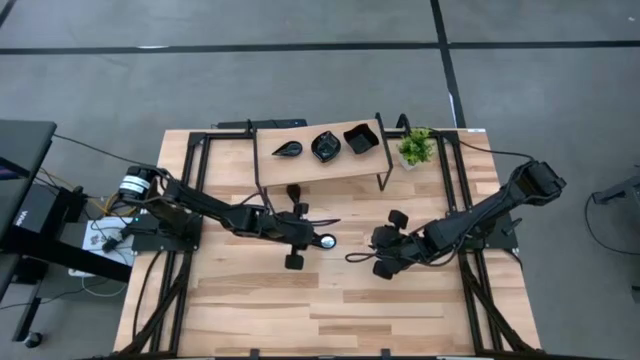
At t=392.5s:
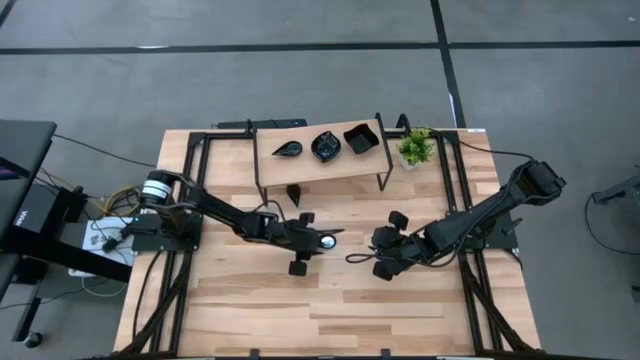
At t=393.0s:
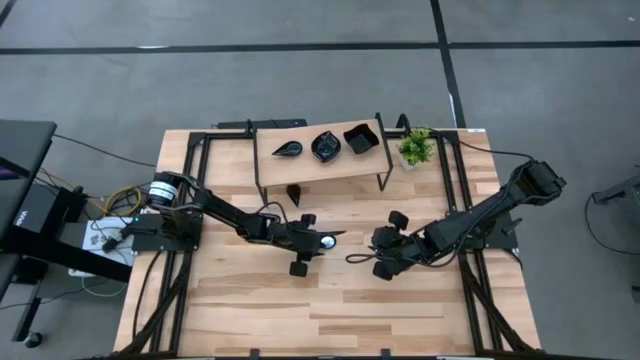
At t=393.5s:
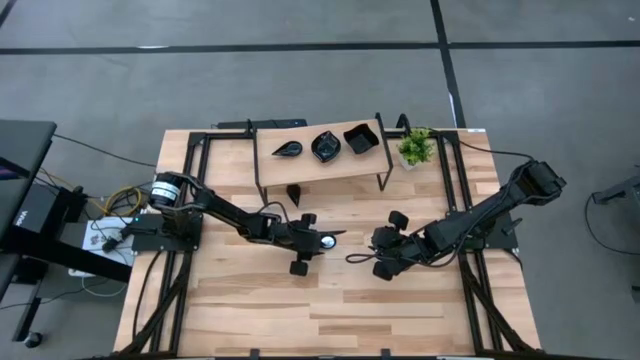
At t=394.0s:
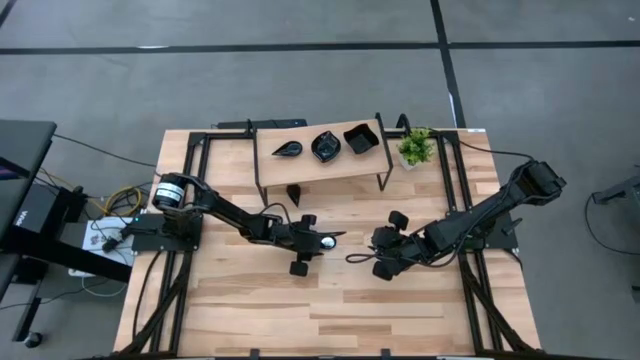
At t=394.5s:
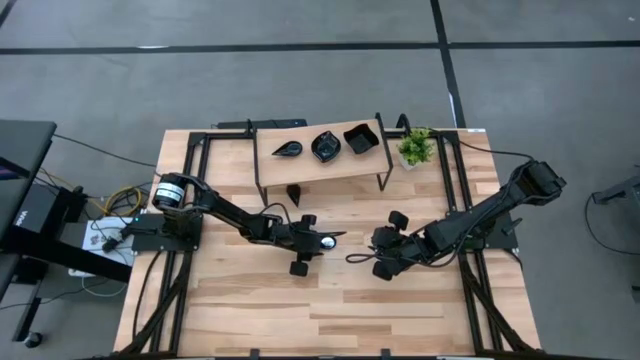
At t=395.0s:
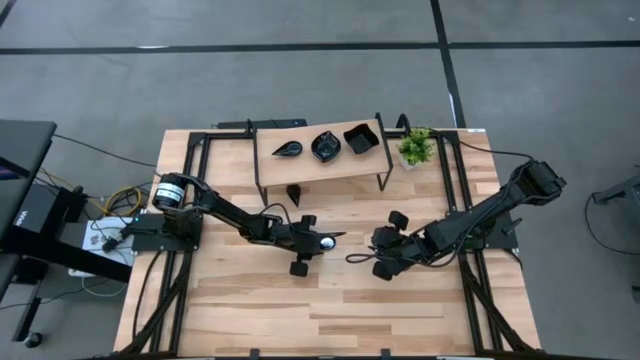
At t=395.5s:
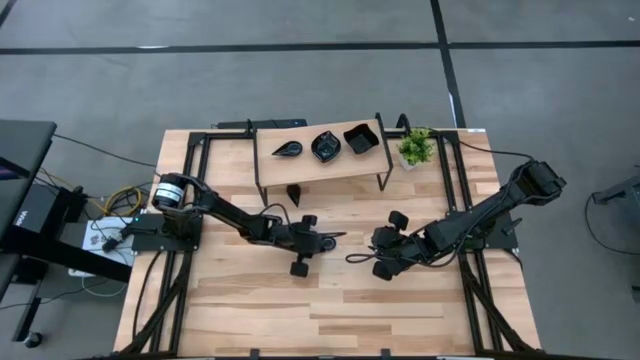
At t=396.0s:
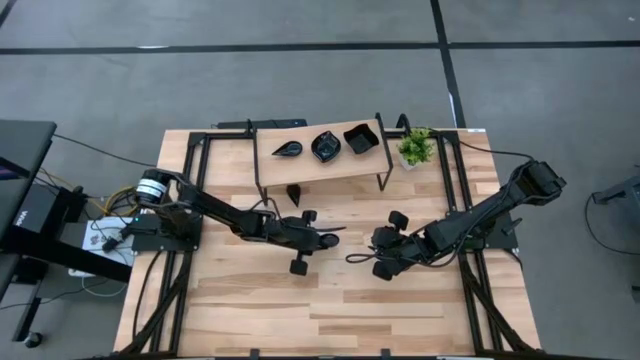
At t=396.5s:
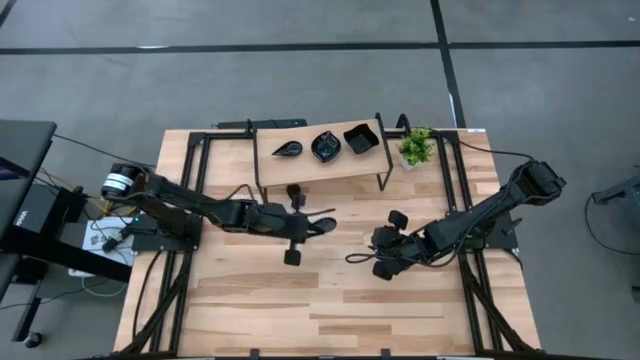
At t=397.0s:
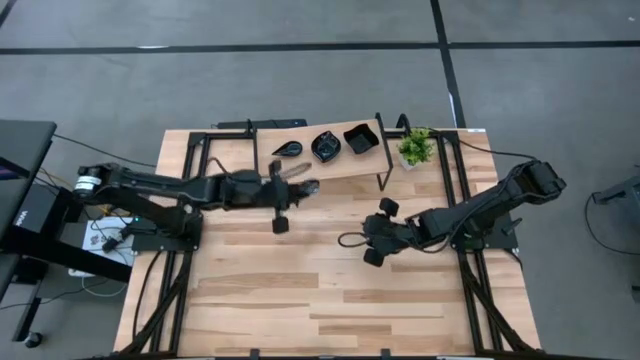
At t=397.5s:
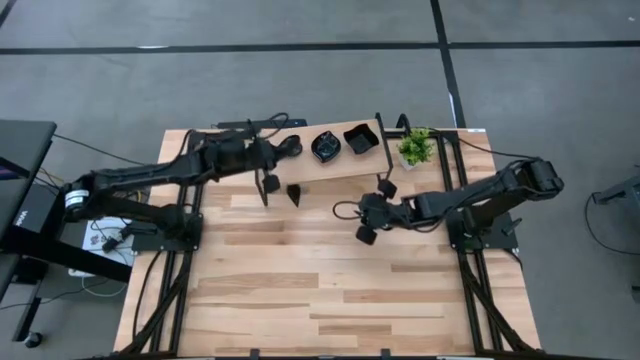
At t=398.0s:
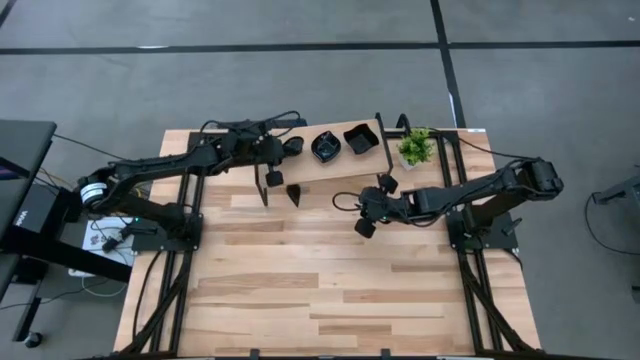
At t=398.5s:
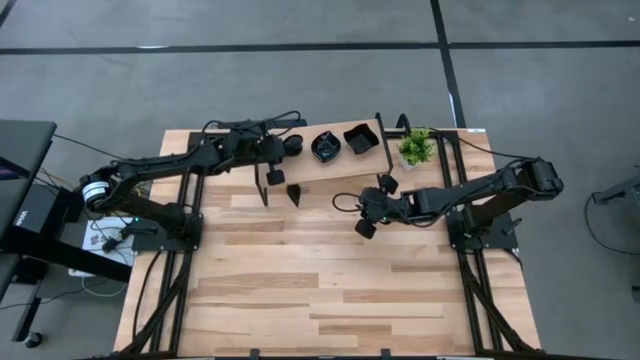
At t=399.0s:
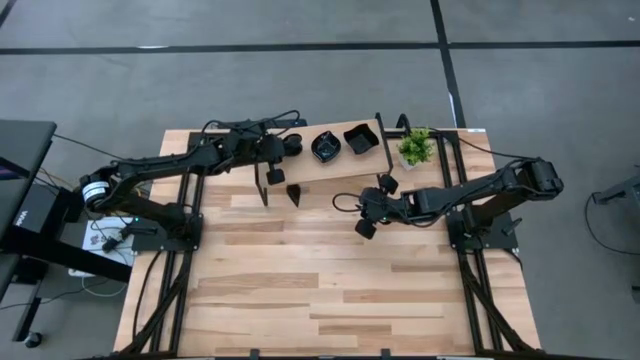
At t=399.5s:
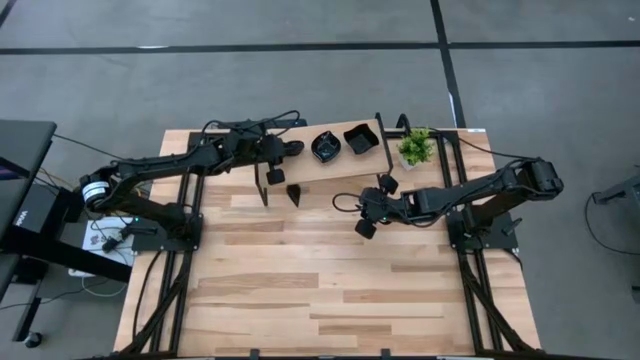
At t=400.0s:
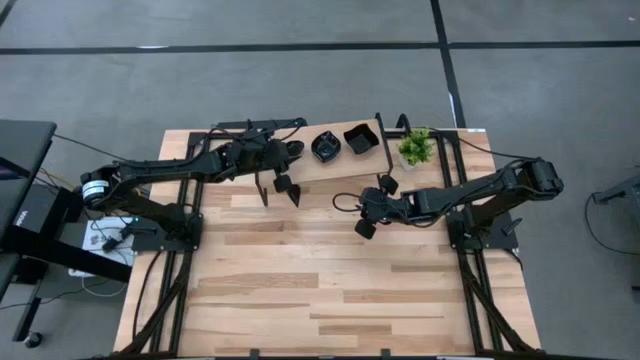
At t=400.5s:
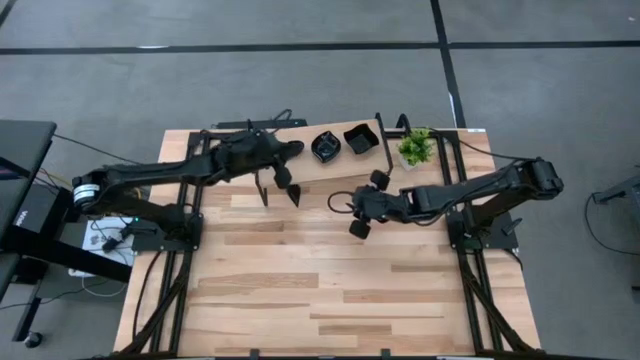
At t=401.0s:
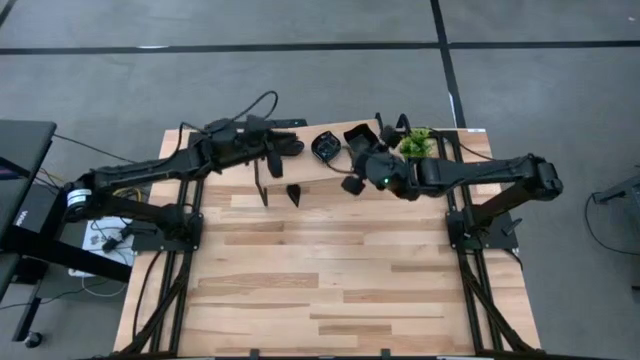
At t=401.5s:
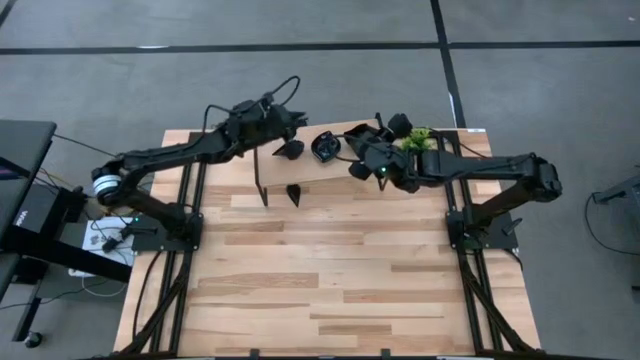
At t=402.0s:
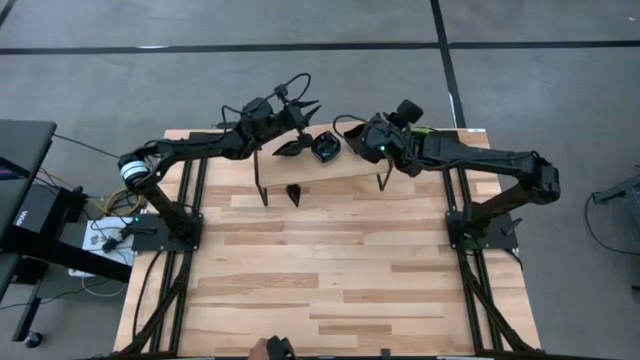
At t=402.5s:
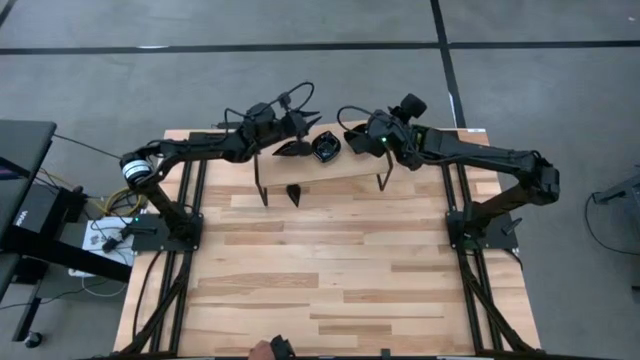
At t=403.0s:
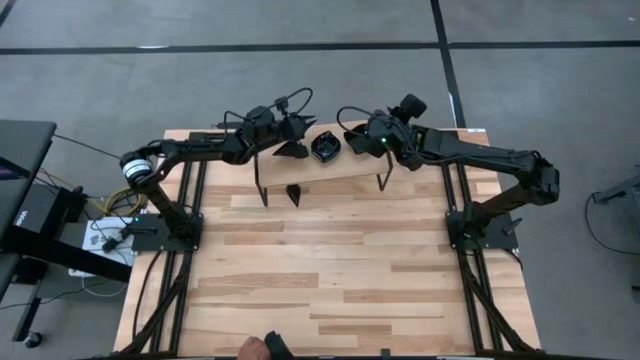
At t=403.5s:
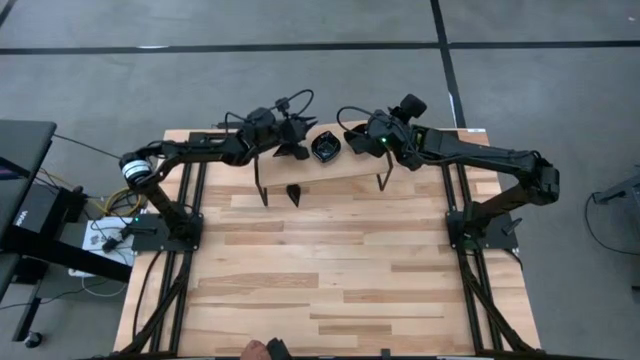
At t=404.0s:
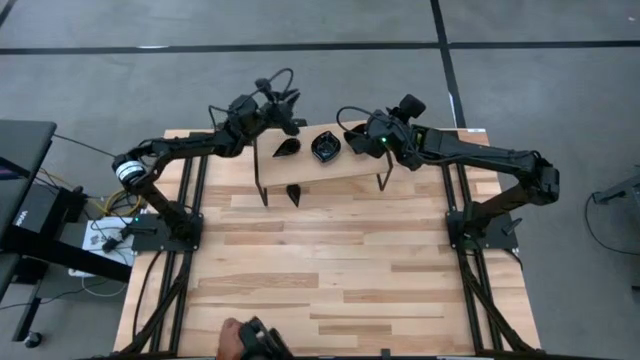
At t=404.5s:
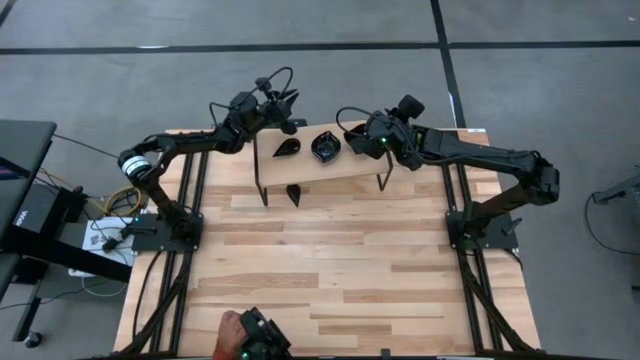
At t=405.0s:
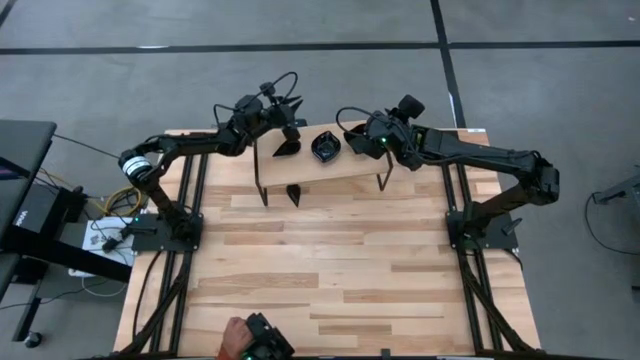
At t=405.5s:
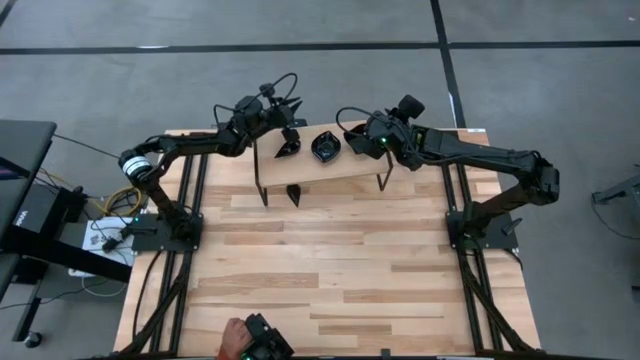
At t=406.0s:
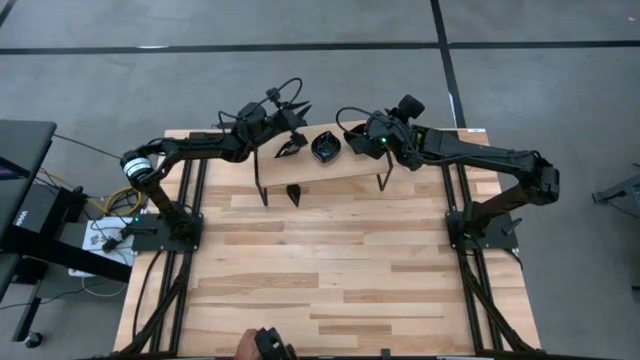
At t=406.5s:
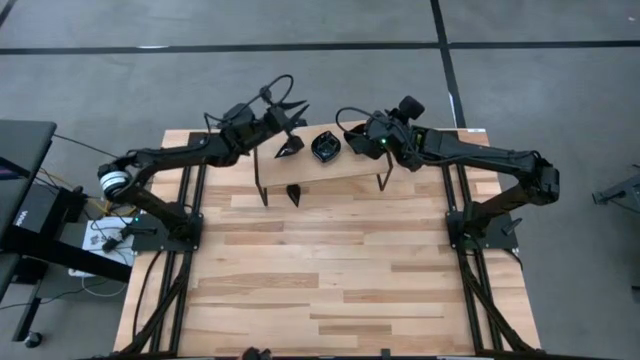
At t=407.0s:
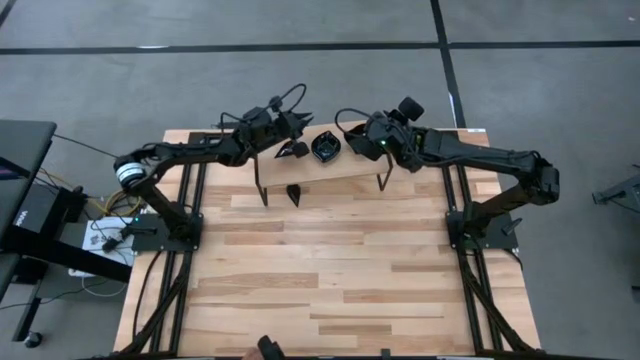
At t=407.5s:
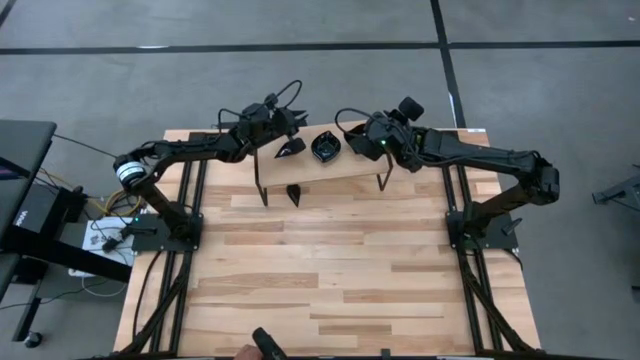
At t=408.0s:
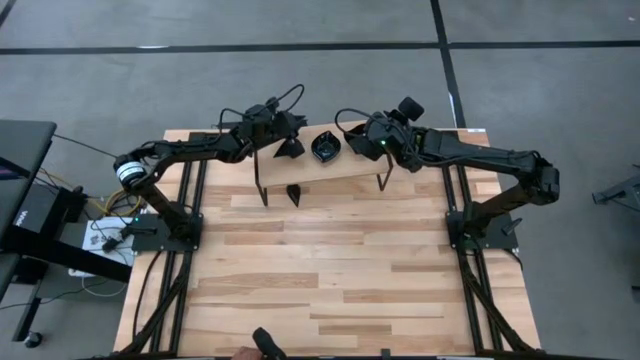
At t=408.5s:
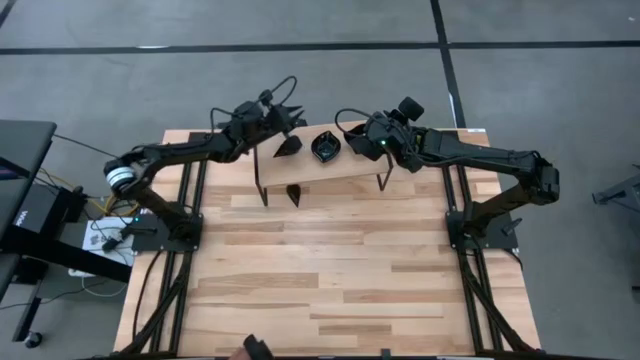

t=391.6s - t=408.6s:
Task: Pick & Place Mini shaped plates
Stack the black drop shaped plate on the black drop shaped plate on the shelf

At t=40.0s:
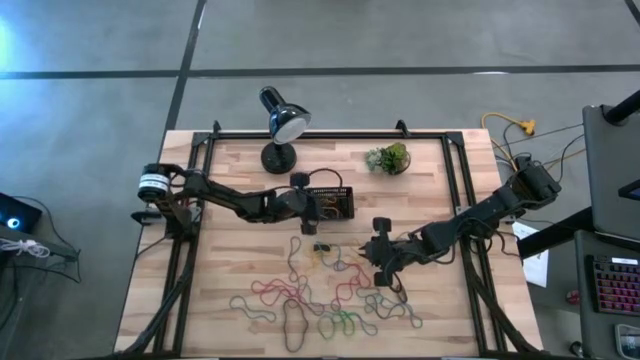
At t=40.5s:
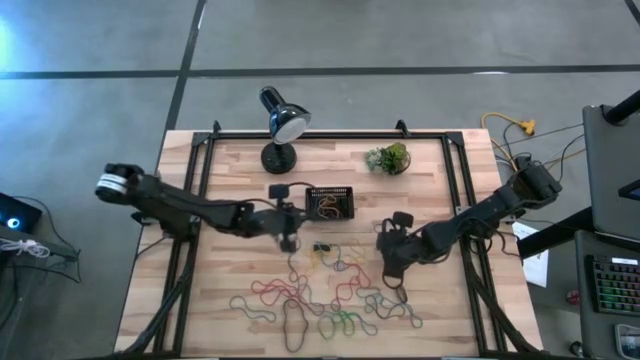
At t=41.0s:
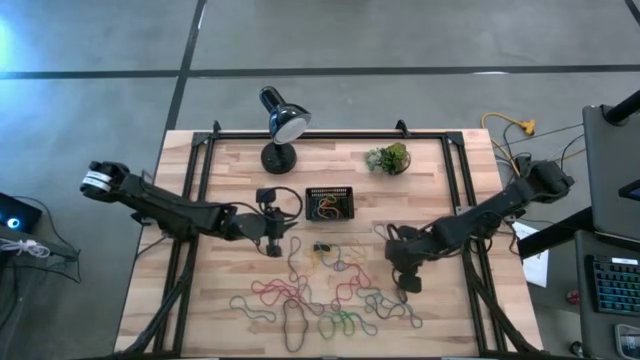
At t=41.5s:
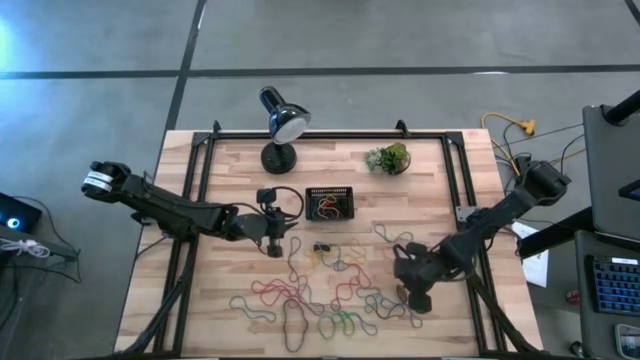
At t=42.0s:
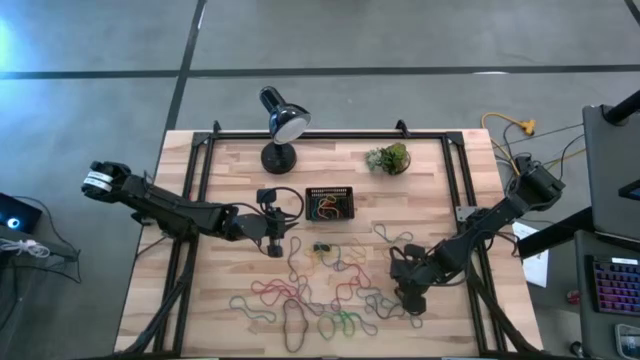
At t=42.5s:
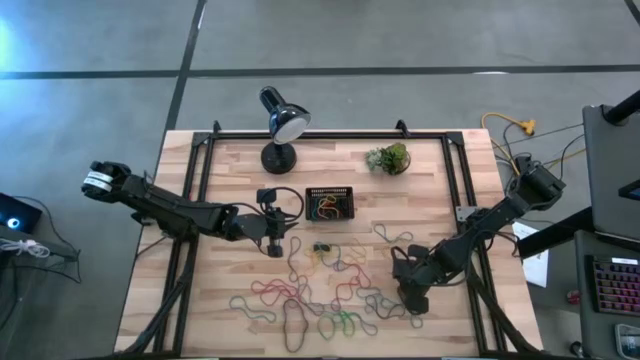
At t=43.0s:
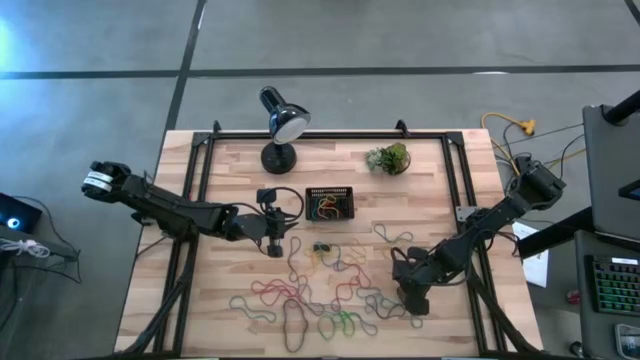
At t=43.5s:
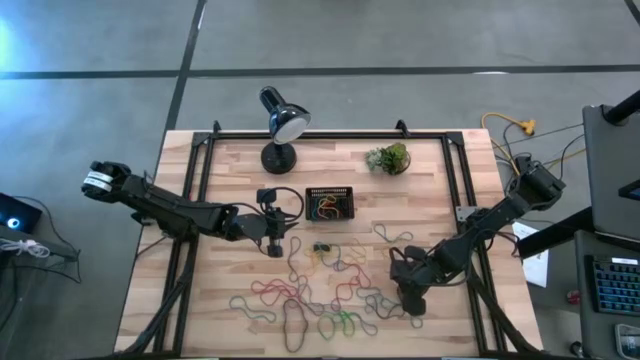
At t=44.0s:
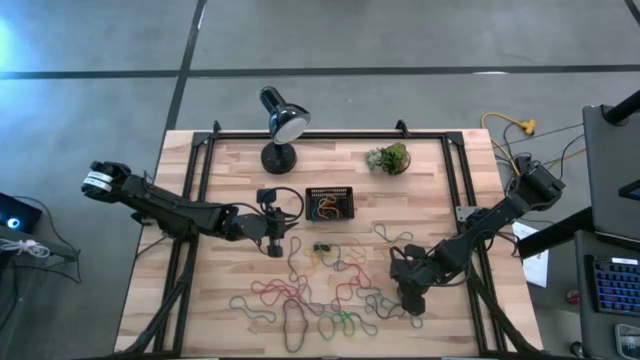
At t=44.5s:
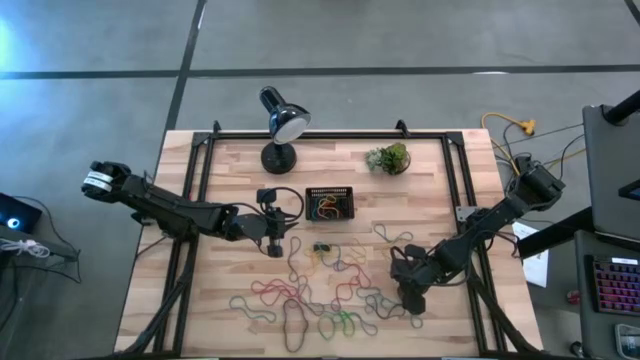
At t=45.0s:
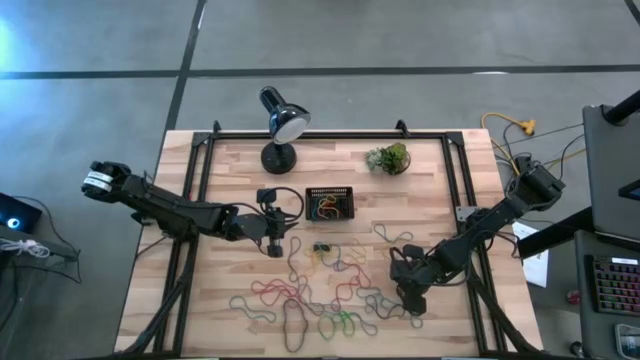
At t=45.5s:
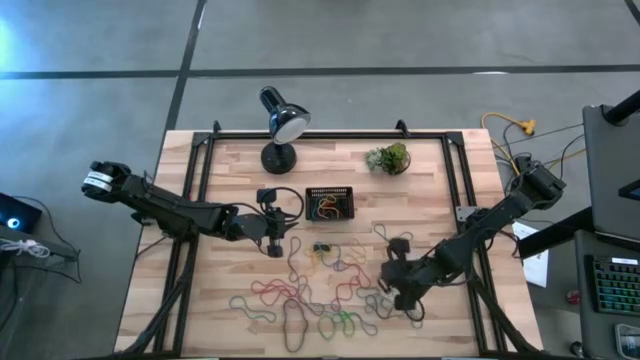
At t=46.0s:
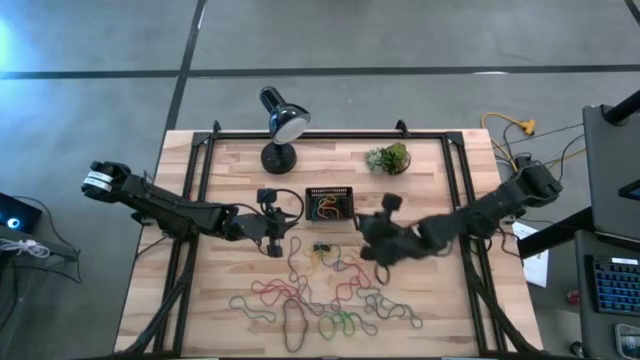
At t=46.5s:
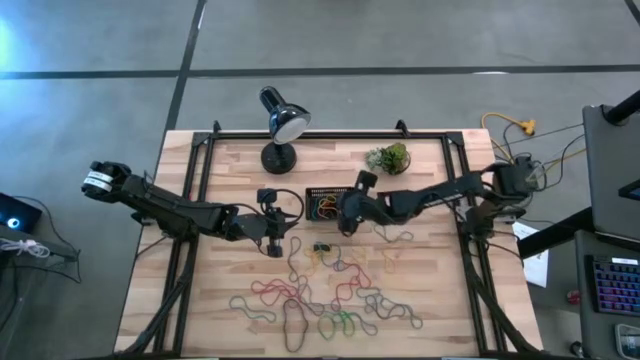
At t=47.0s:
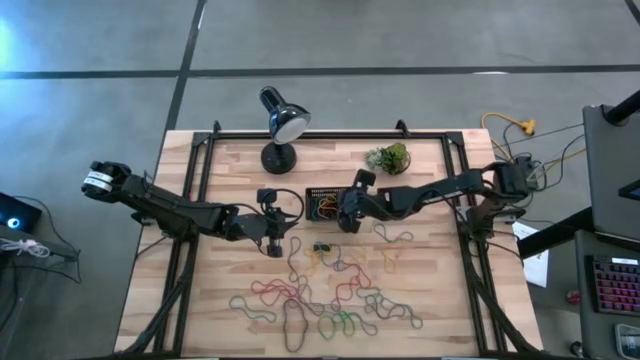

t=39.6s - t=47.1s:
Task: Pick and place rubber bands into bin
Put the black rubber band into the black bin
